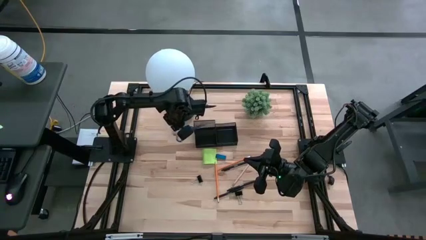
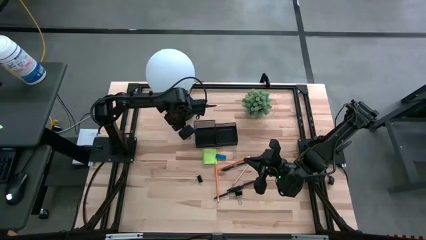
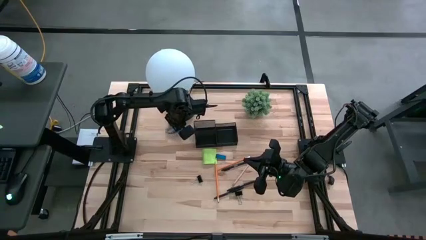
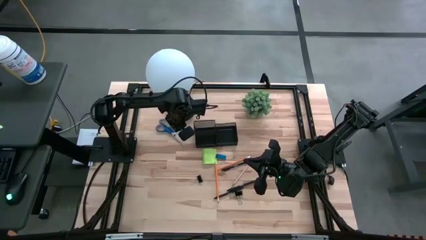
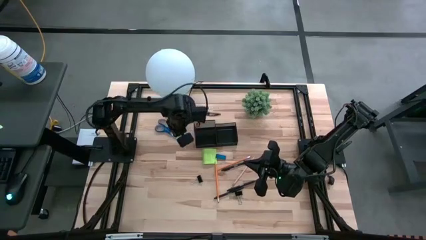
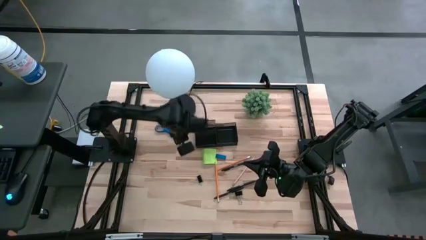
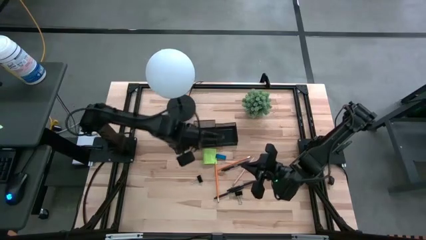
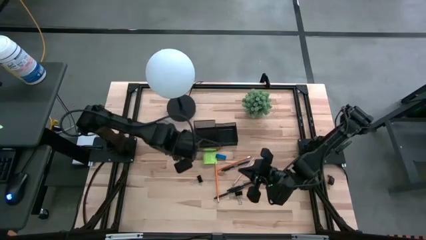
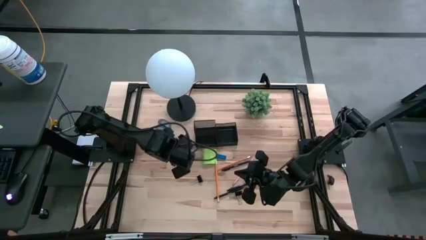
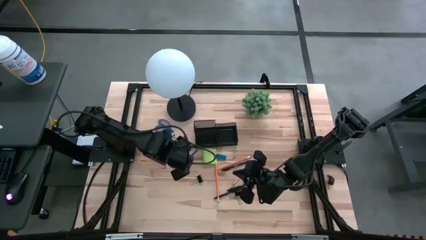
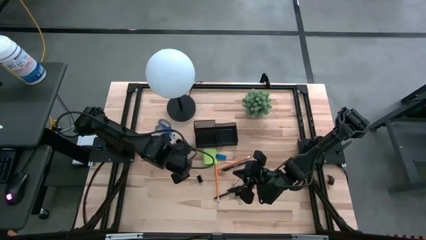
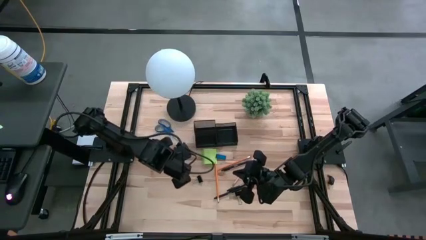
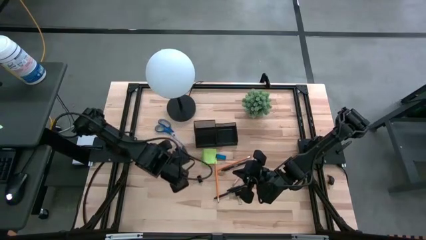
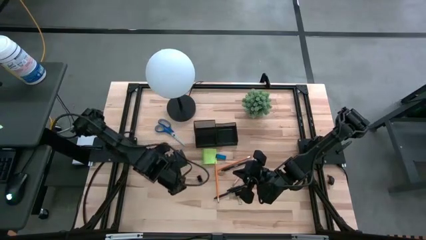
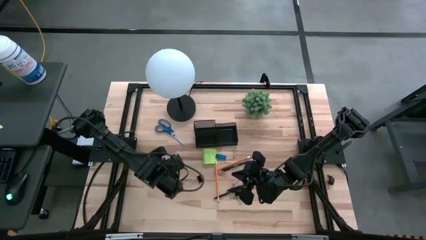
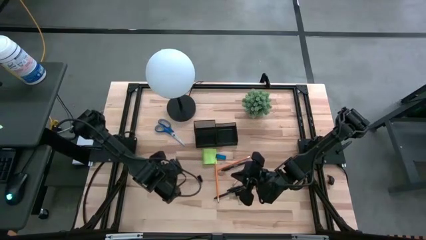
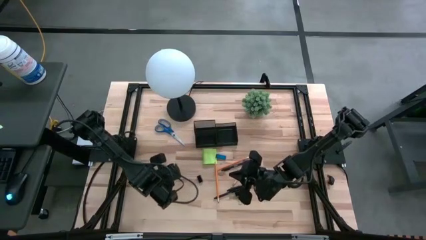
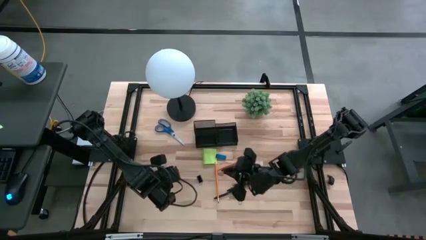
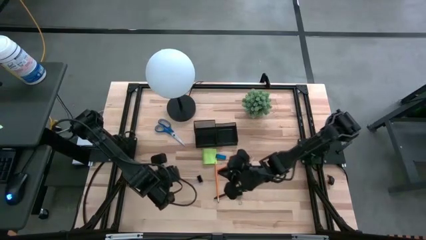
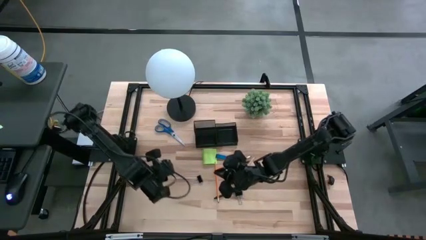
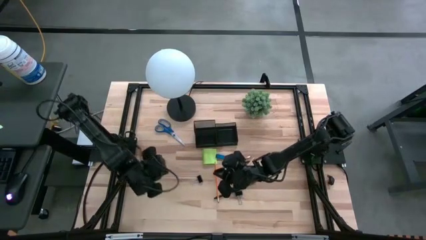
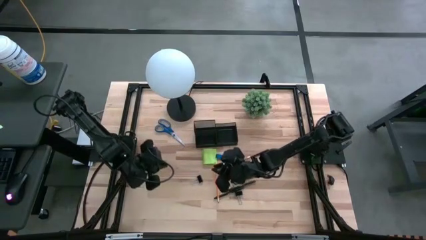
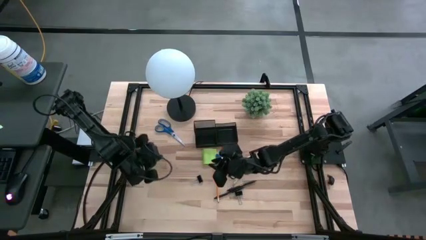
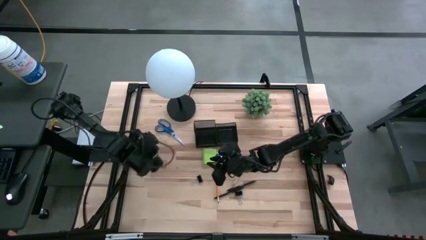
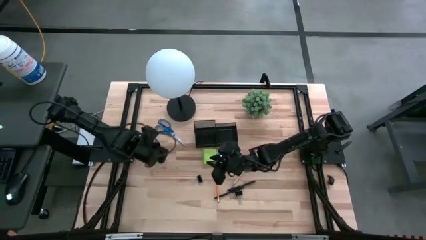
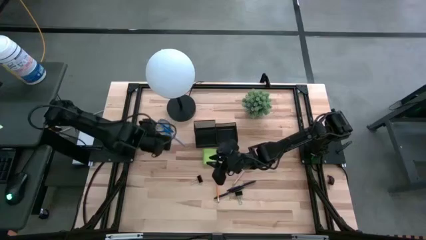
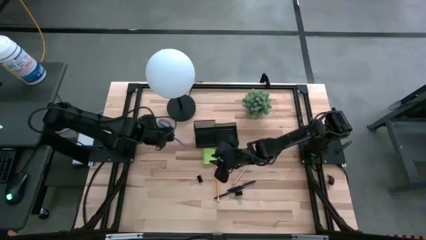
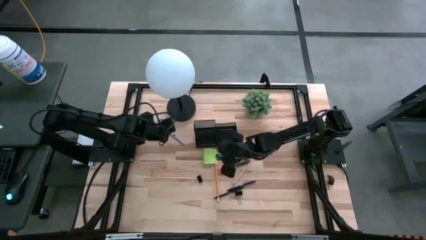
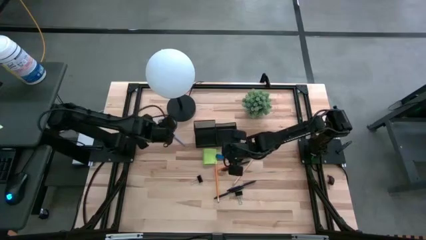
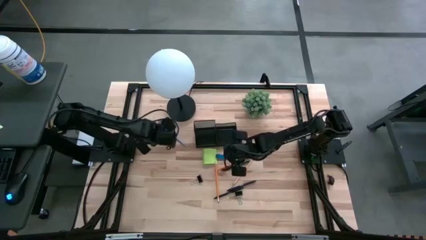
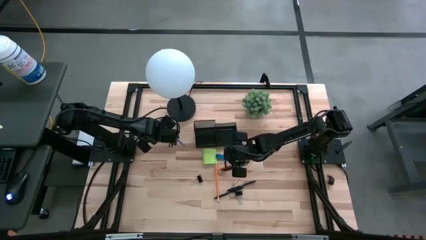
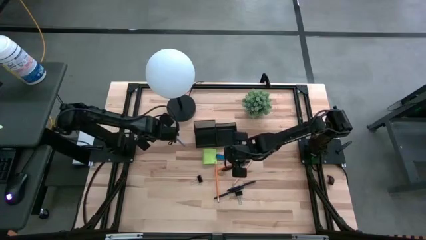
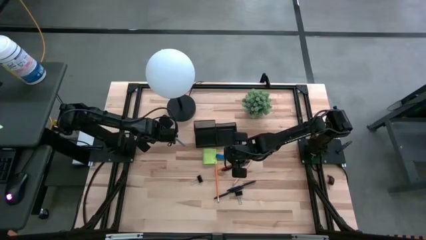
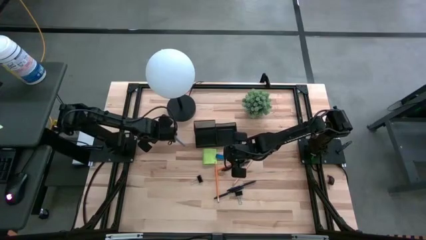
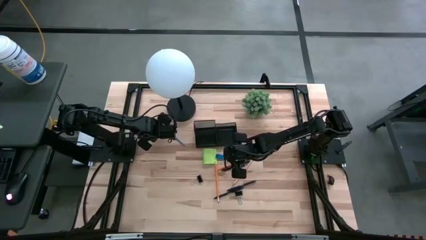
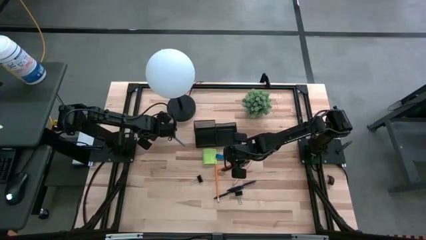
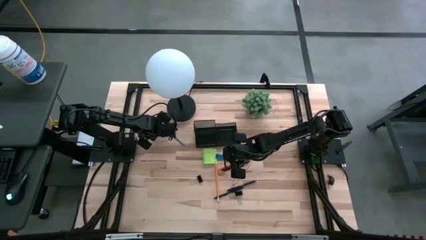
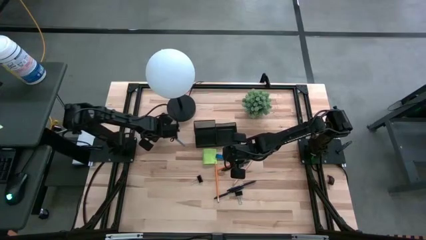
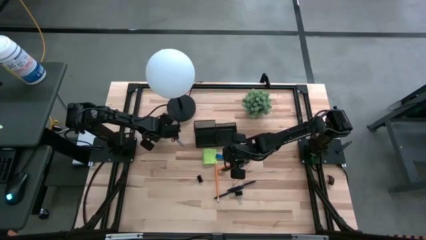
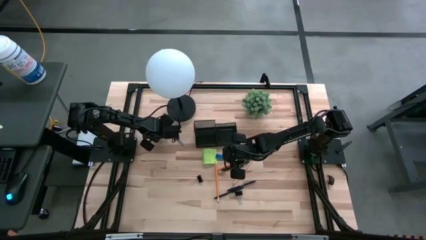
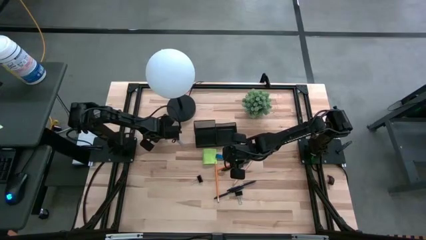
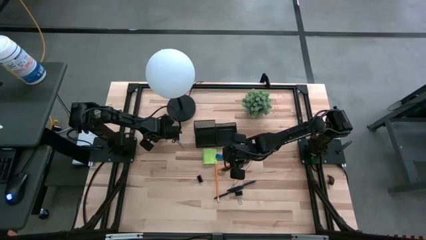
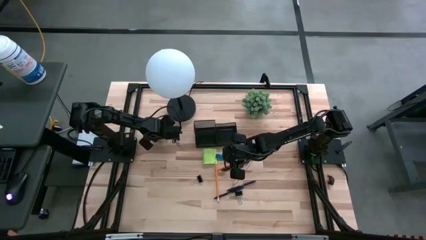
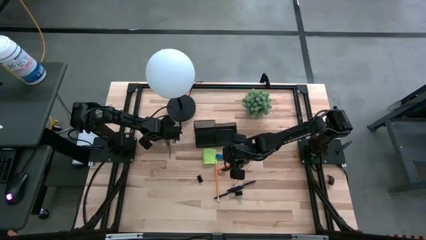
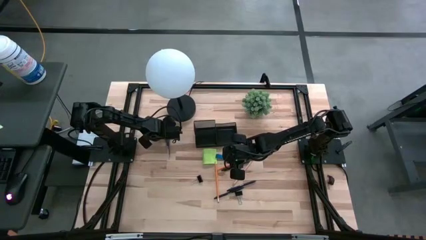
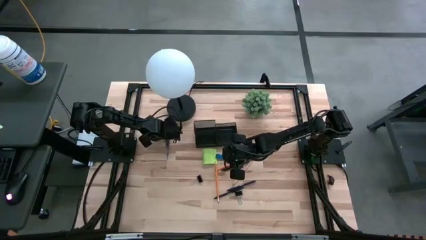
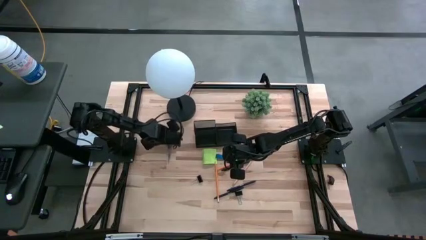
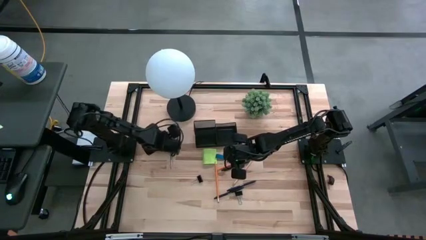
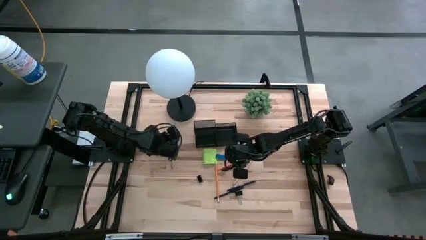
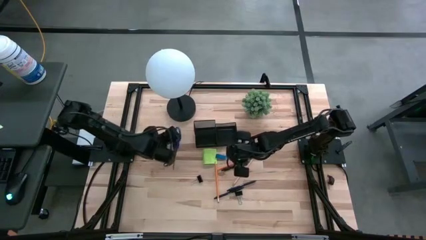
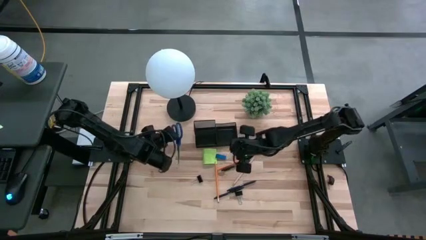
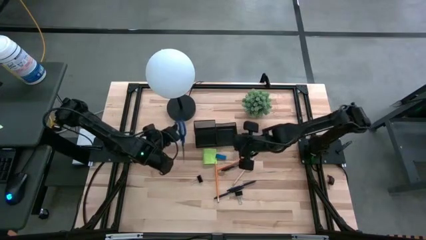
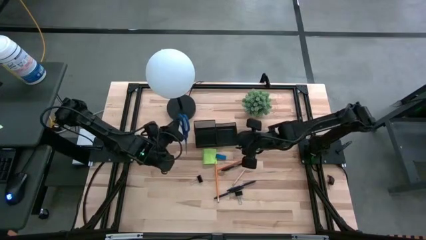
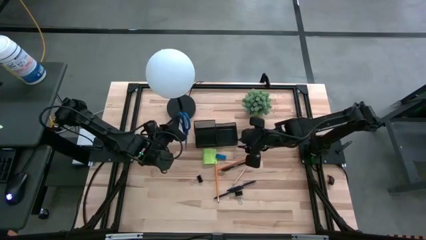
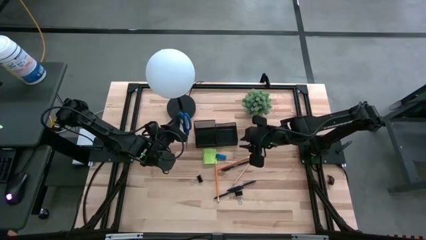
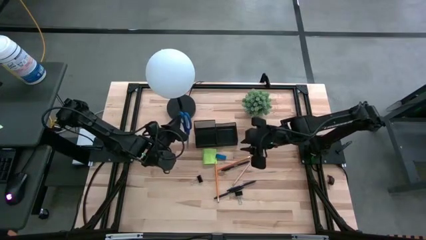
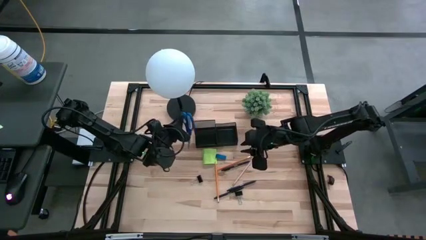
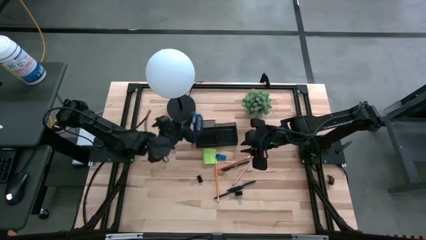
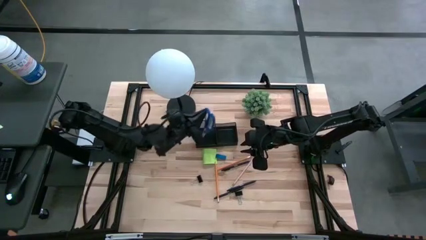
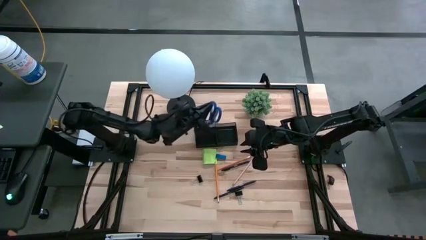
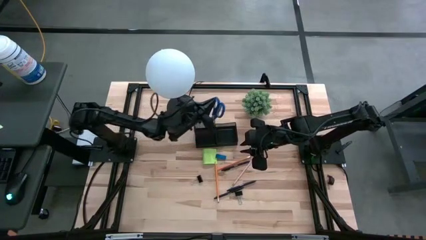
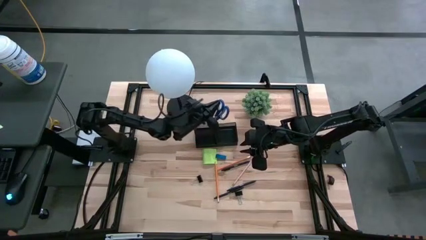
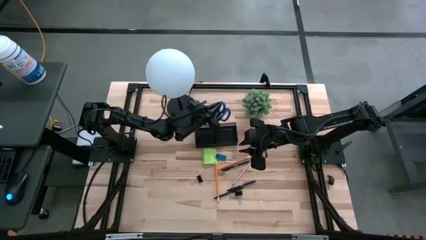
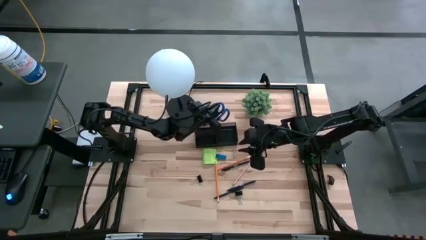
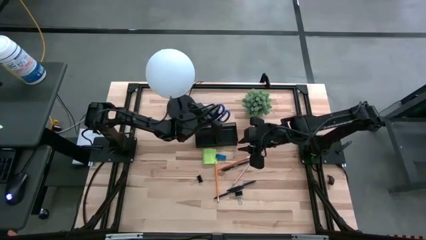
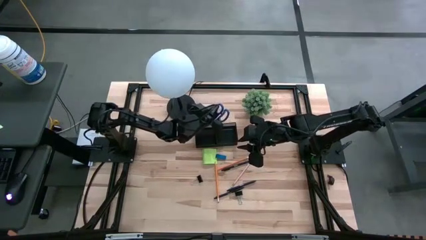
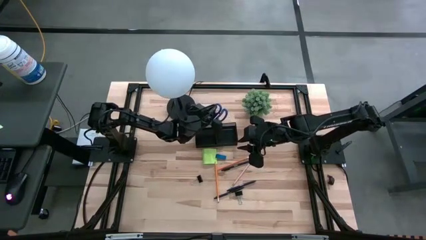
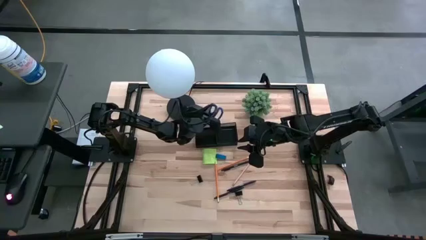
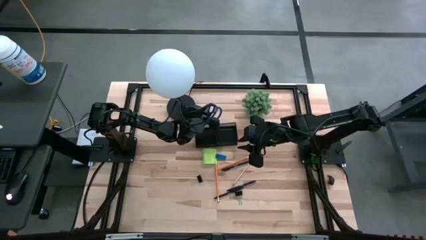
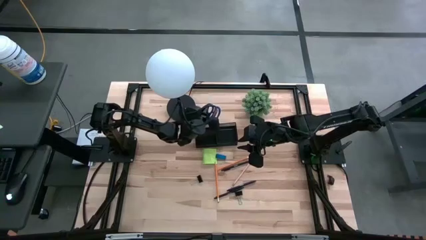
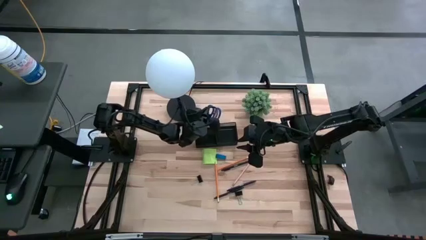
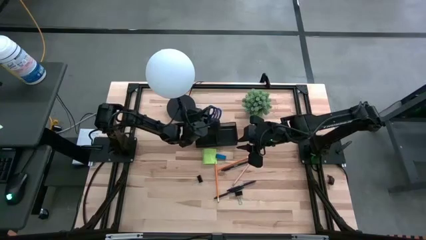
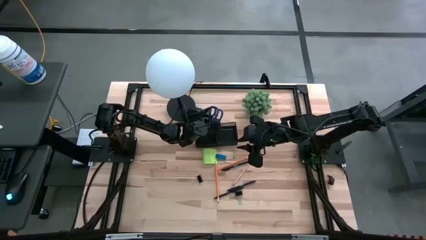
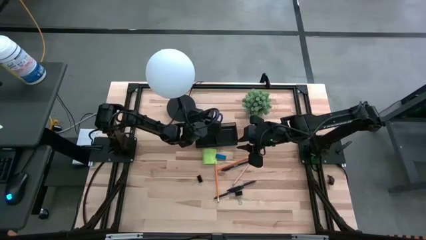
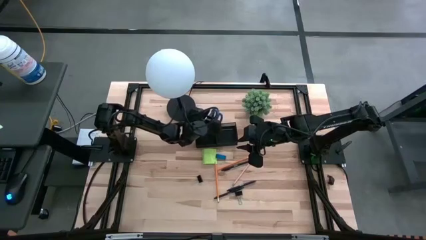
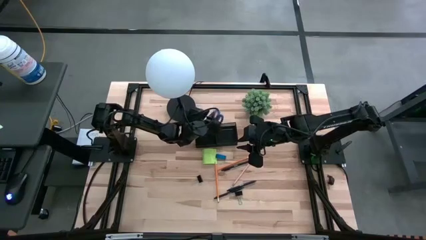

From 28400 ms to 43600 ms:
Task: Pick and place office supplies into organizer
Put the blue scissors into the top left side of the desk organizer
